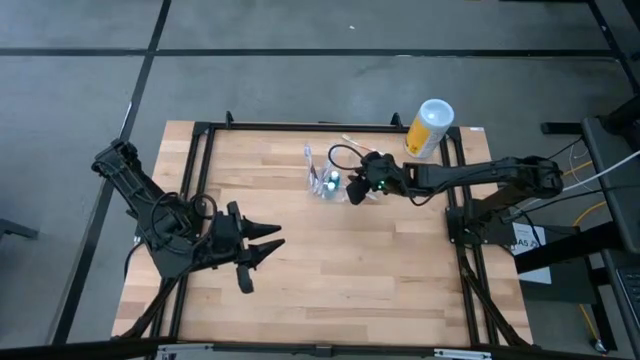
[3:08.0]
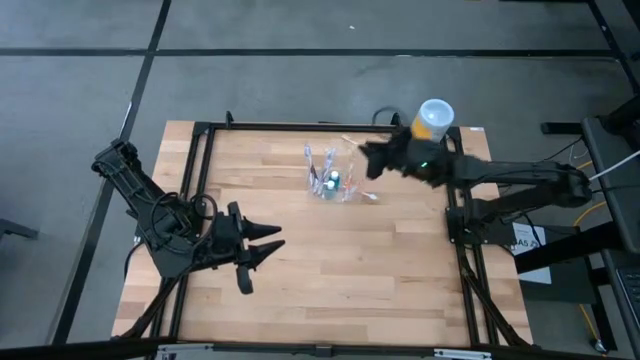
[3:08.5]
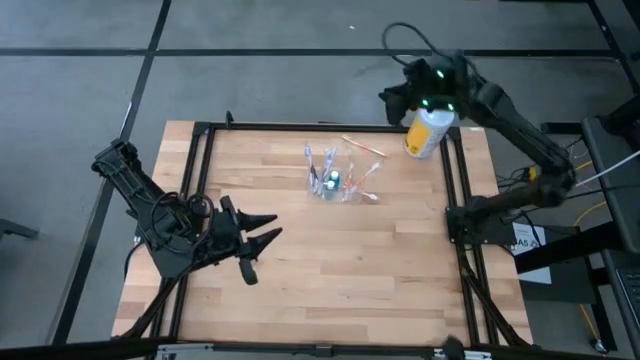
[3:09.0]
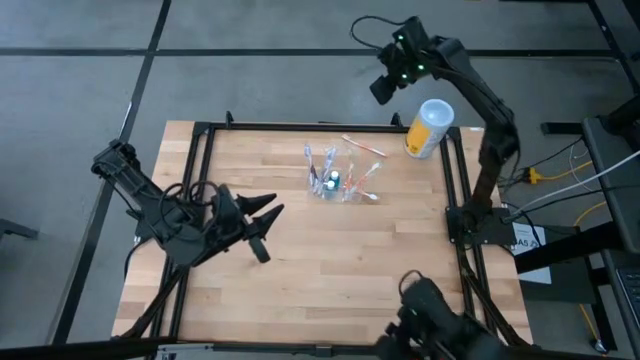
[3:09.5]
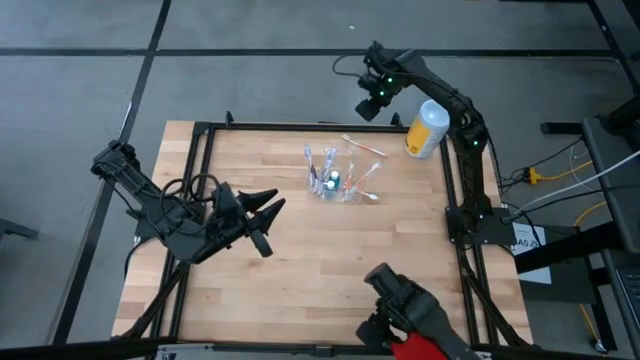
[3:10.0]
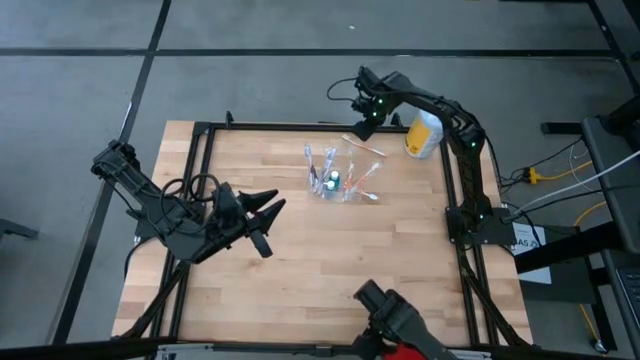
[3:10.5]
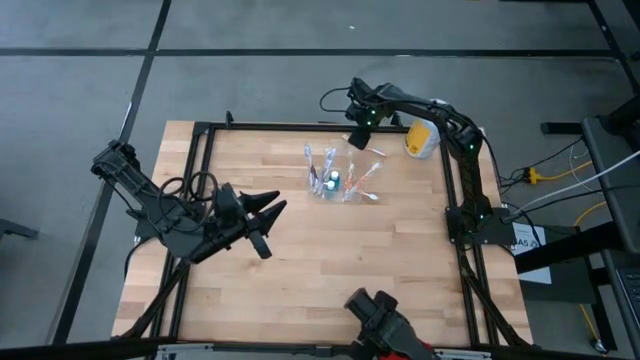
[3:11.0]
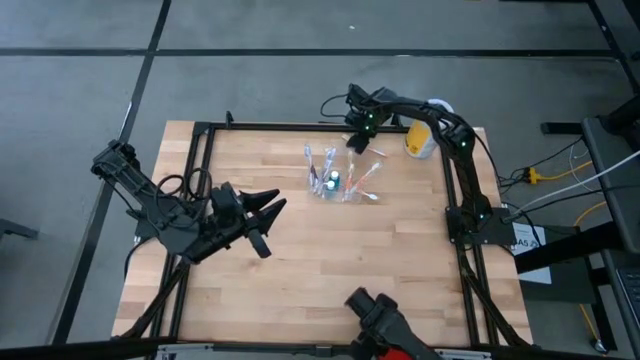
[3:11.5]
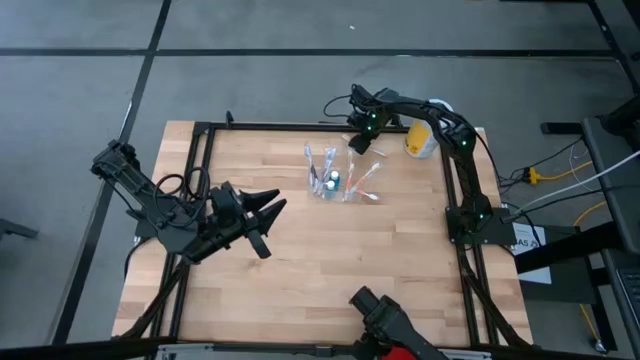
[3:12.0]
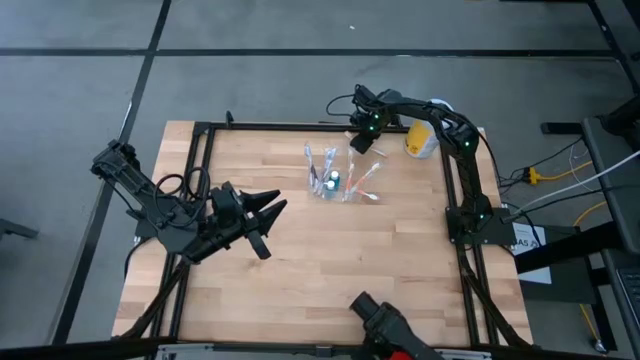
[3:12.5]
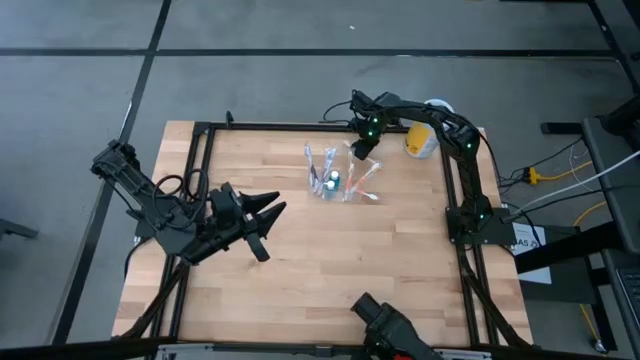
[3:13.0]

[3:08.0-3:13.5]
Task: Pick & Place toothbrushing station
Put the orange toothbrush into the right section of the transparent organizer

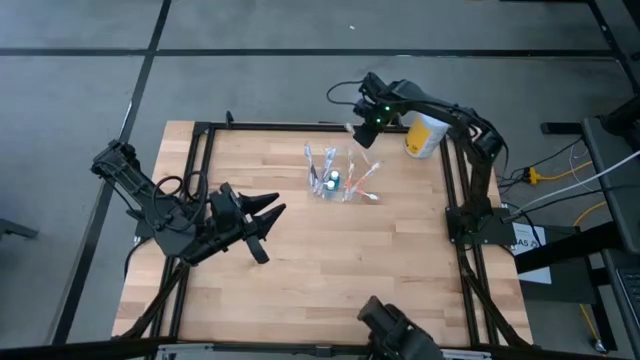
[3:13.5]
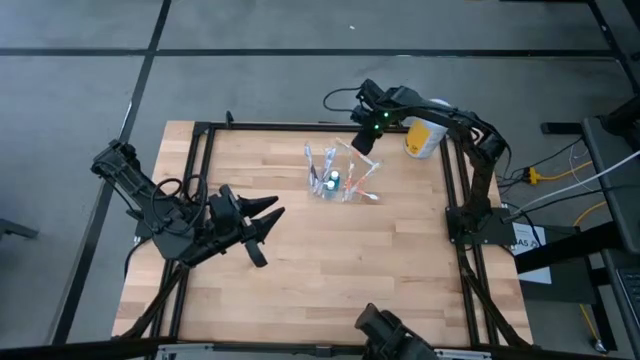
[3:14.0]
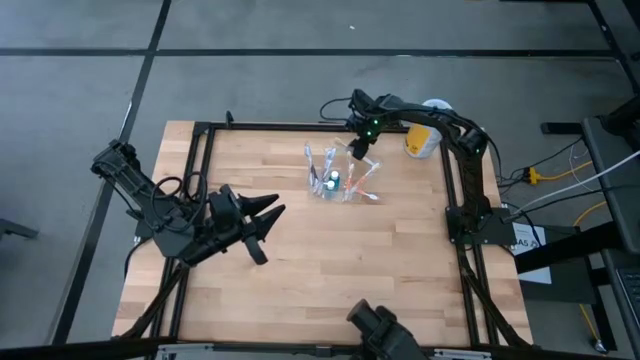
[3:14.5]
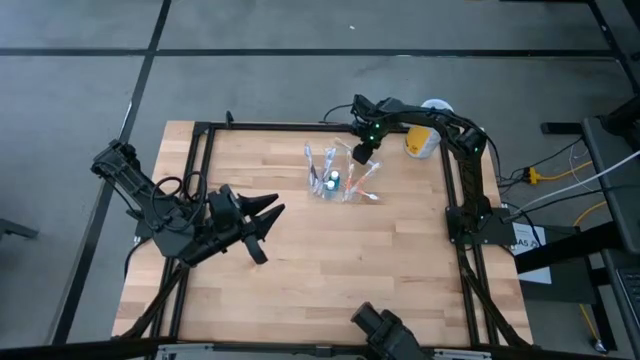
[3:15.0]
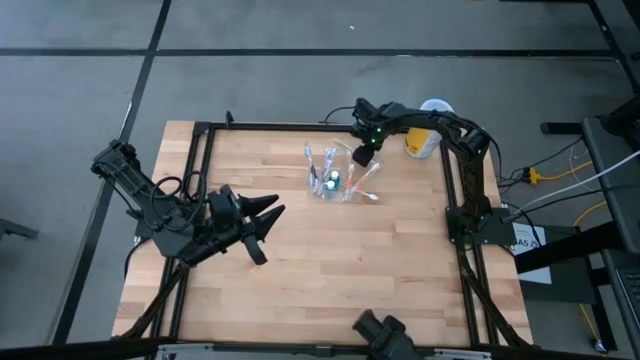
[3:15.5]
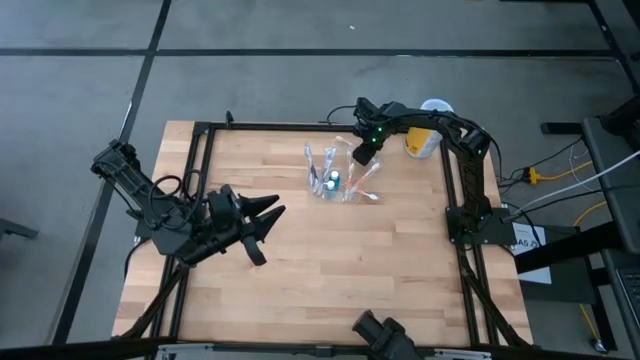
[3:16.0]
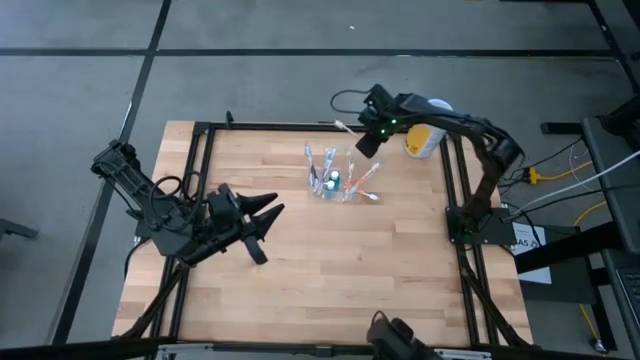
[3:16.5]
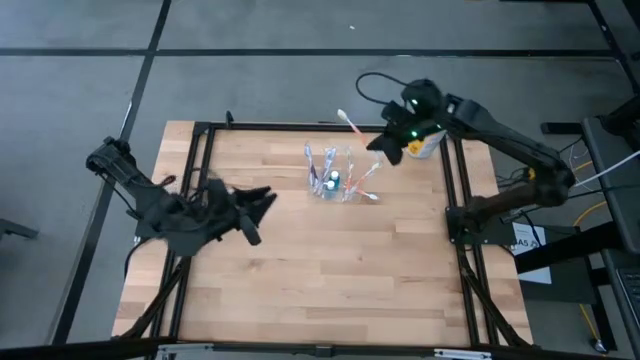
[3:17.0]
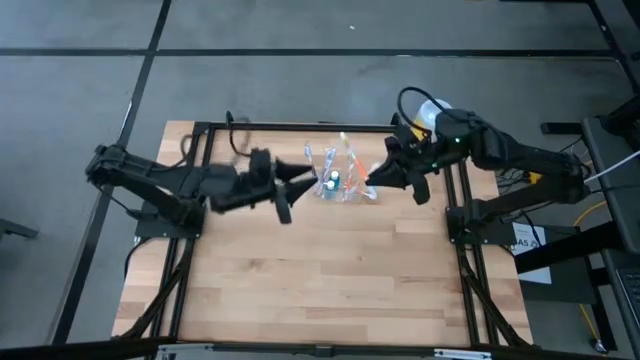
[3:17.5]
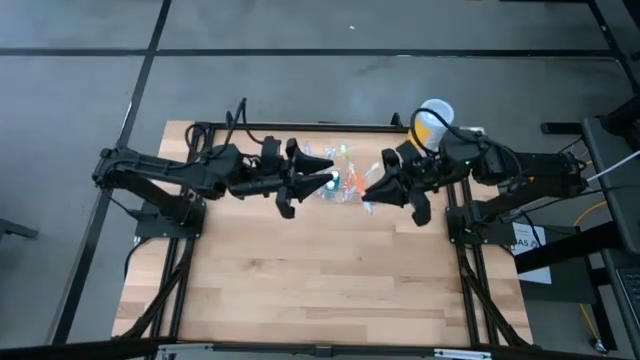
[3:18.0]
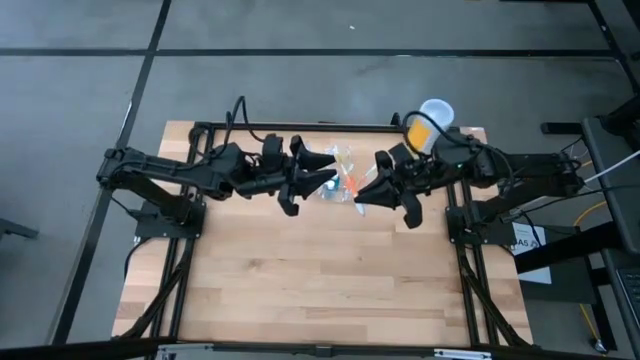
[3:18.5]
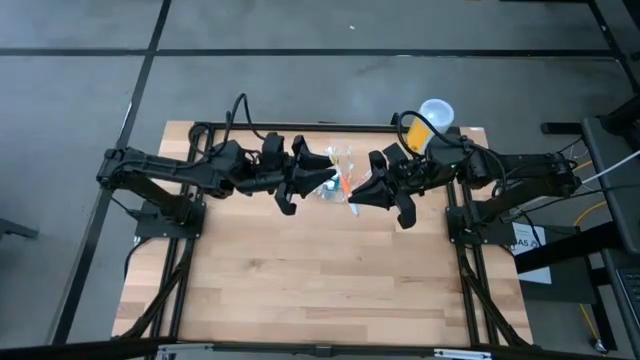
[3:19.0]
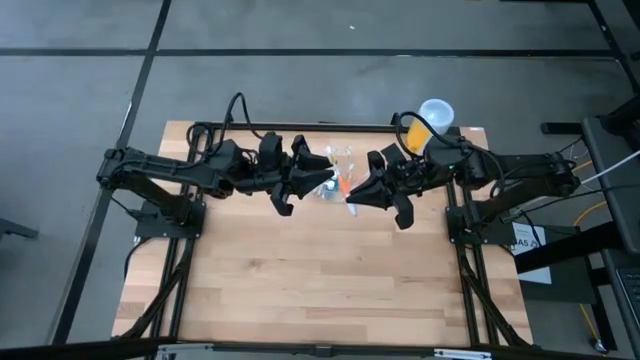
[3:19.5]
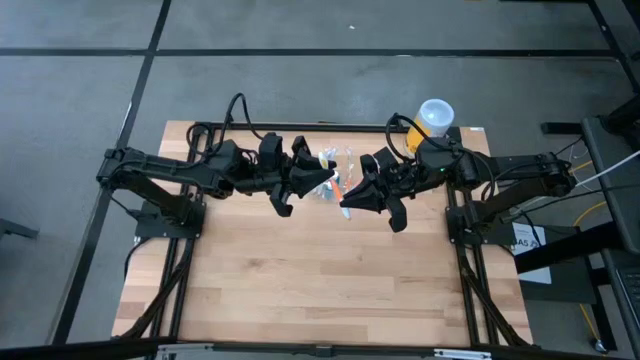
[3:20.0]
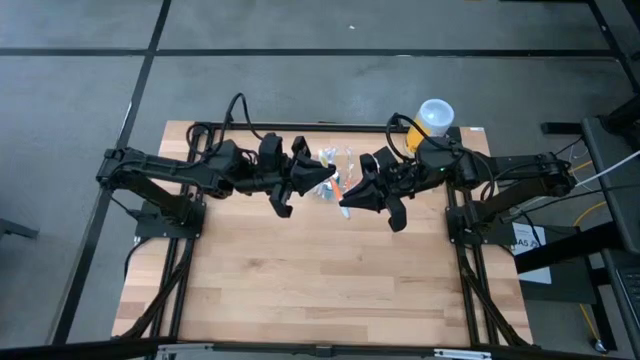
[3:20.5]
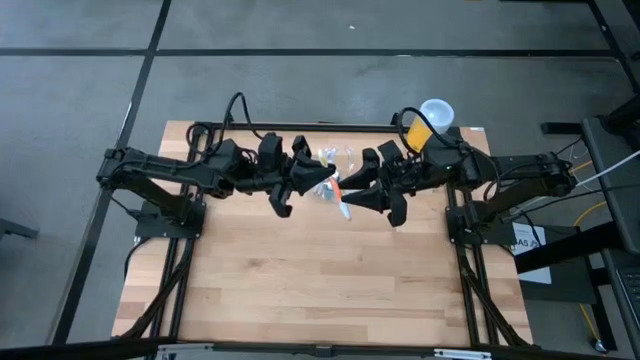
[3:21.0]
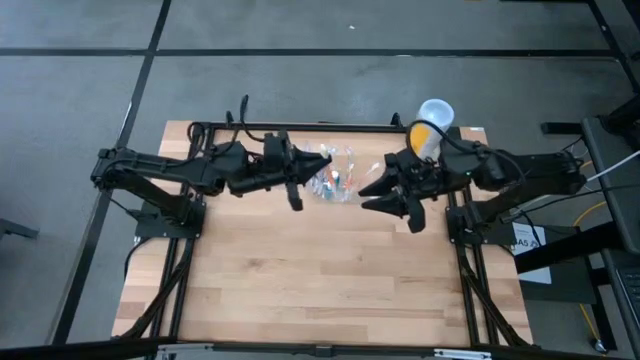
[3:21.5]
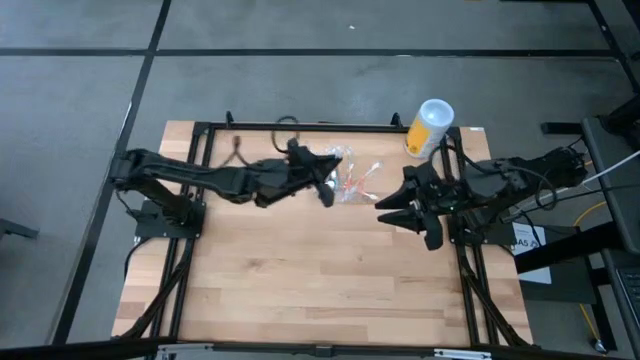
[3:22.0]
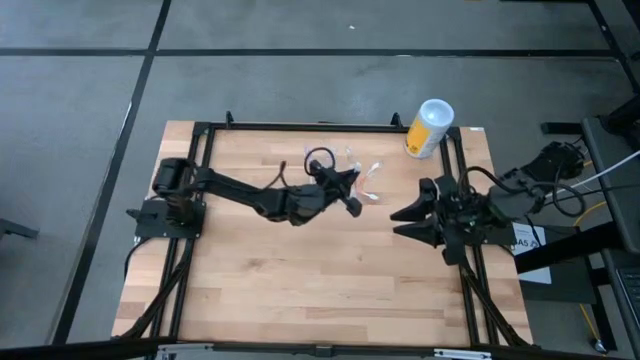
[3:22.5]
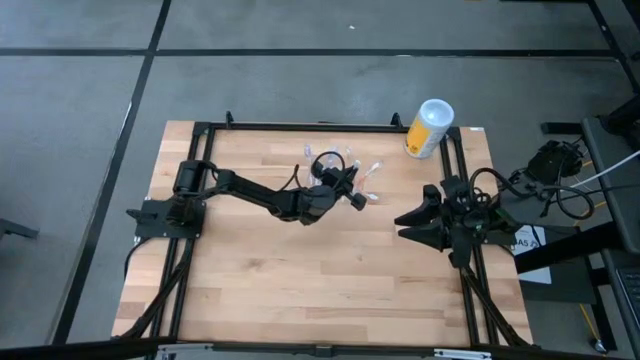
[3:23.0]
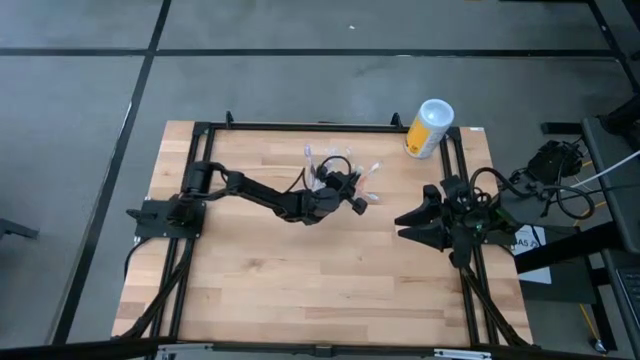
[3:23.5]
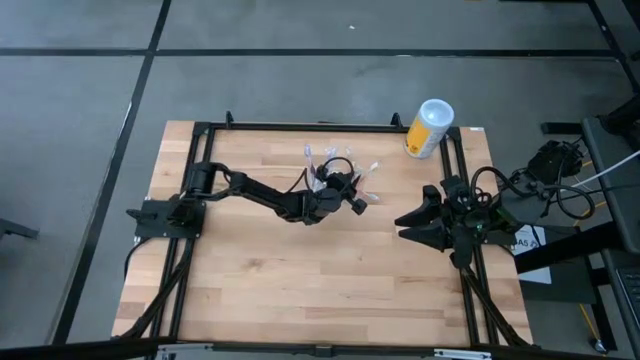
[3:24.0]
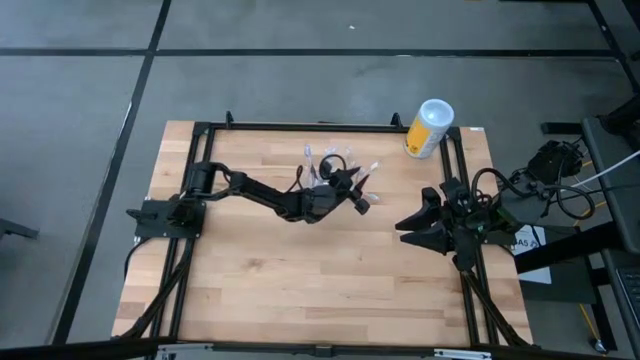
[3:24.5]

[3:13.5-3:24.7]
Put the orange toothbrush into the right section of the transparent organizer

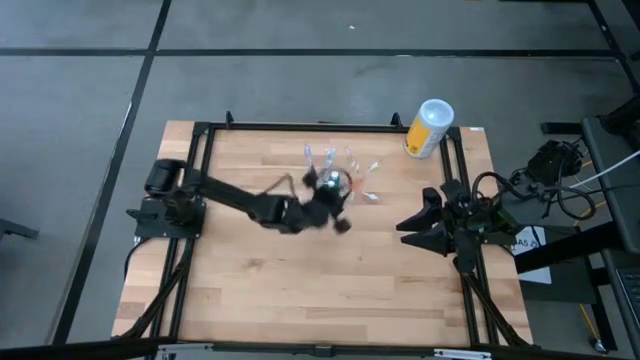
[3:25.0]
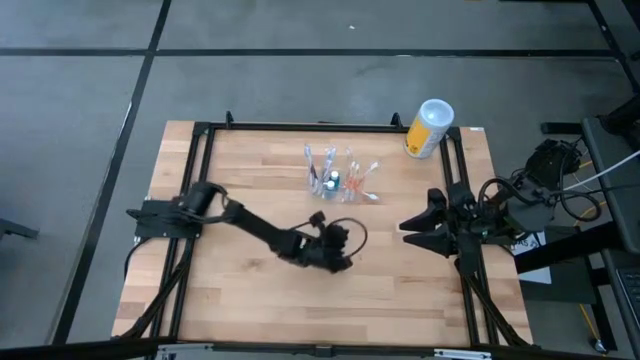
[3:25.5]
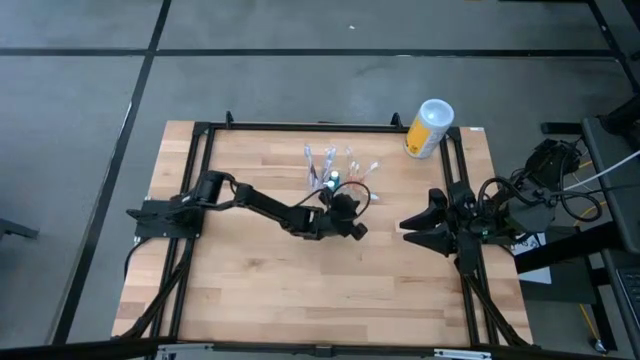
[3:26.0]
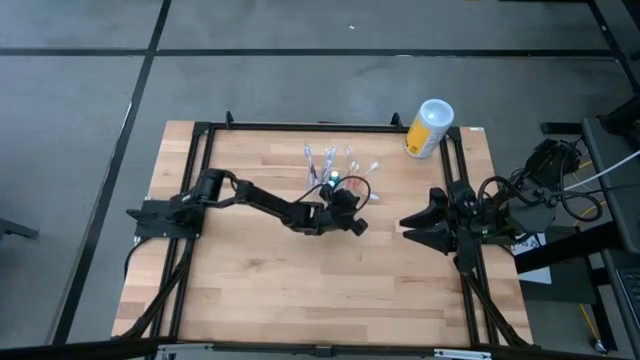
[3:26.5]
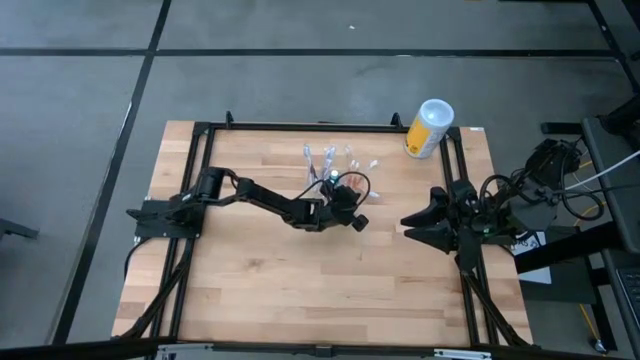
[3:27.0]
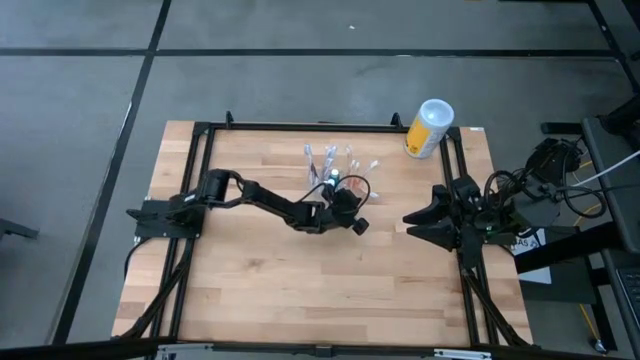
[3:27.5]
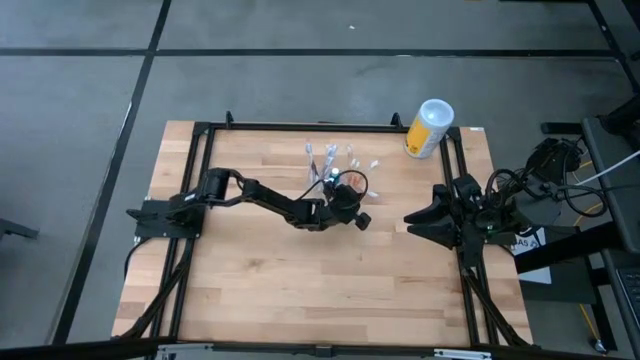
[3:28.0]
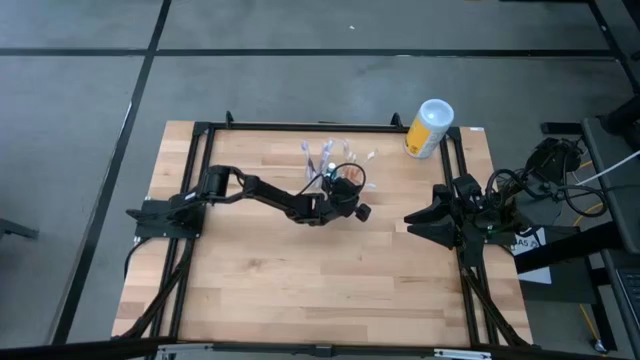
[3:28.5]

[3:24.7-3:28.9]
Adjust the transparent organizer

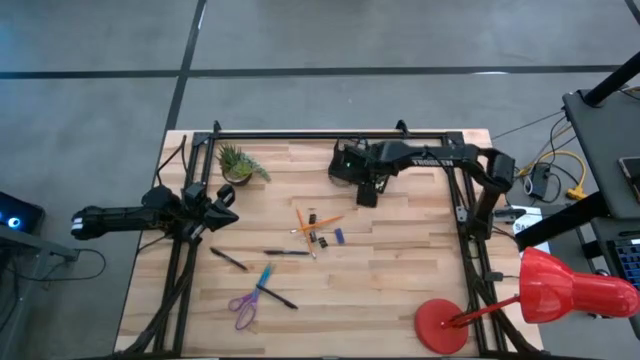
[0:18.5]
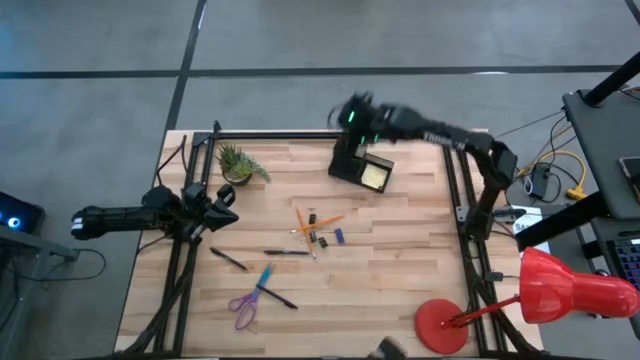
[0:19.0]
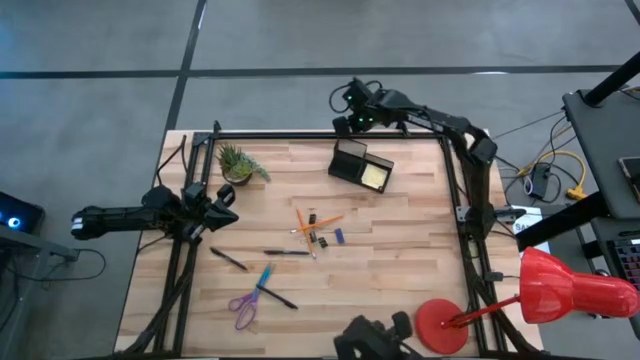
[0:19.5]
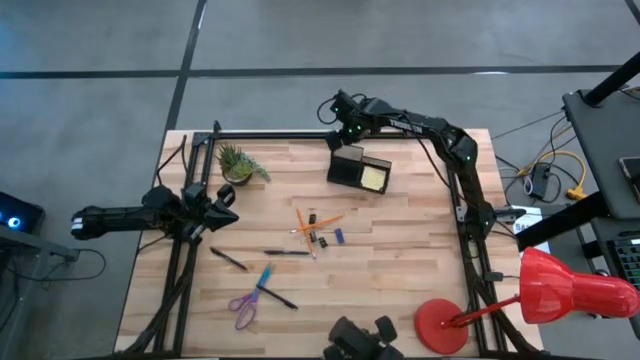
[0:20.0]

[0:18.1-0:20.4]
Task: Pick and place office supplies into organizer
Adjust the black desk organizer
